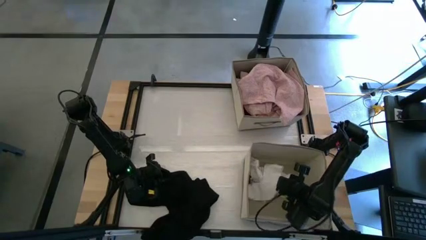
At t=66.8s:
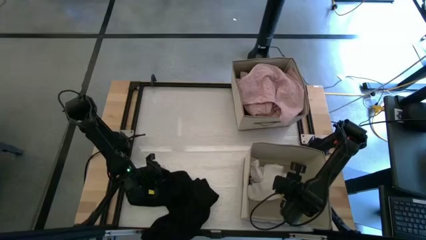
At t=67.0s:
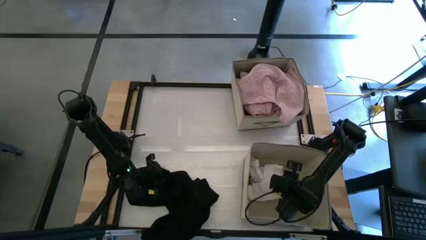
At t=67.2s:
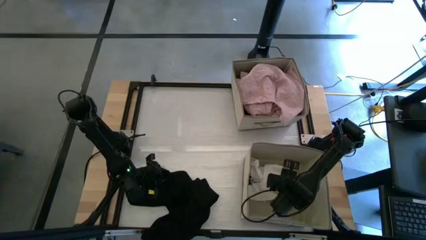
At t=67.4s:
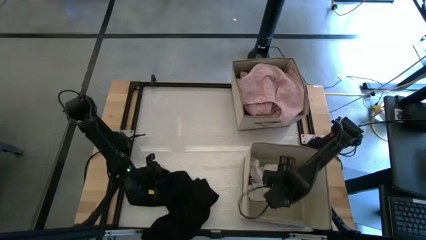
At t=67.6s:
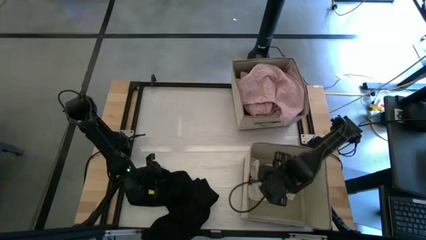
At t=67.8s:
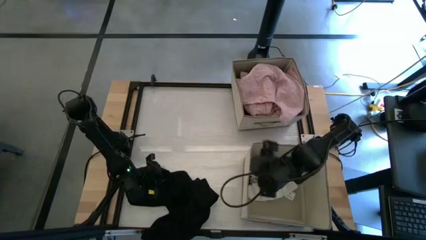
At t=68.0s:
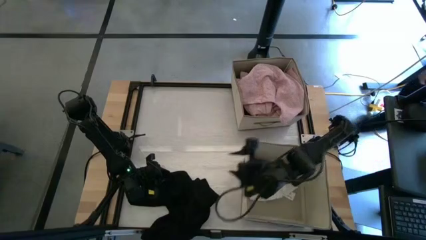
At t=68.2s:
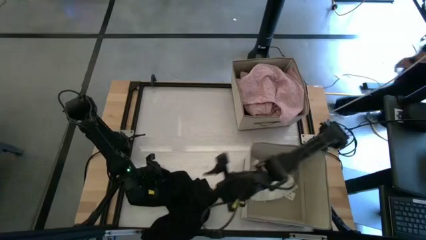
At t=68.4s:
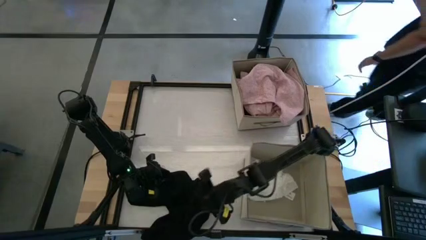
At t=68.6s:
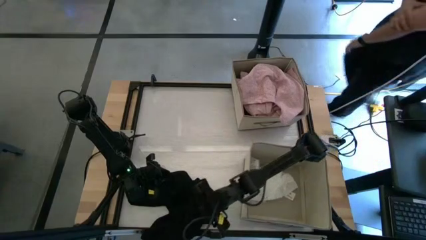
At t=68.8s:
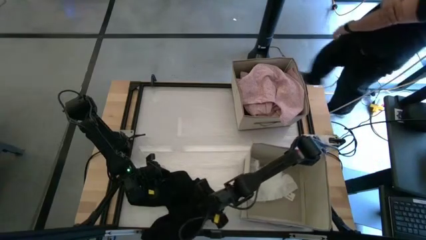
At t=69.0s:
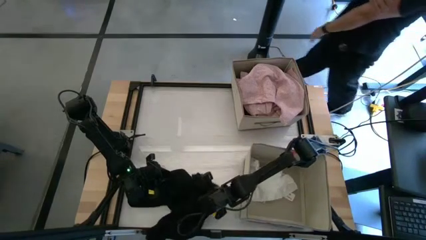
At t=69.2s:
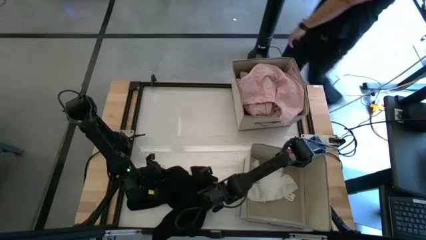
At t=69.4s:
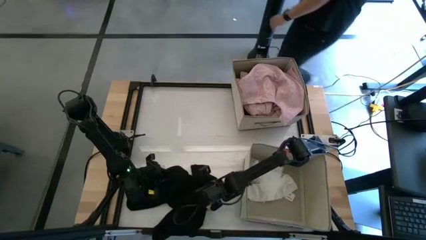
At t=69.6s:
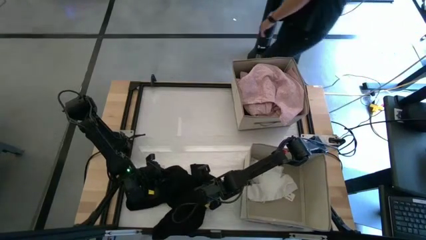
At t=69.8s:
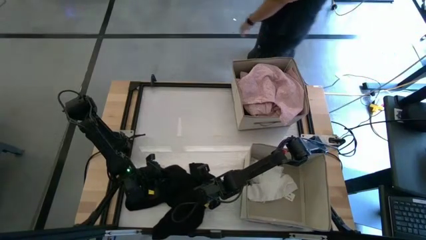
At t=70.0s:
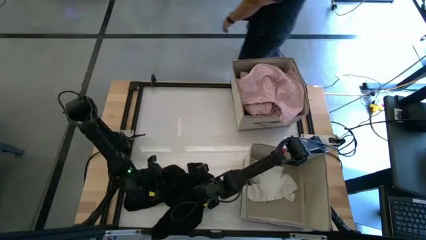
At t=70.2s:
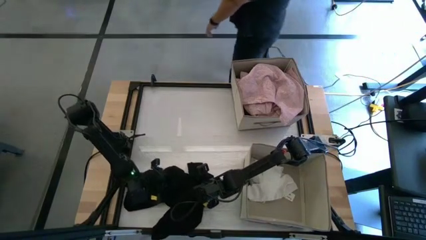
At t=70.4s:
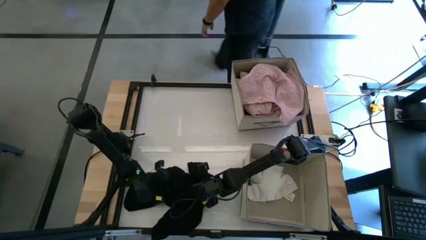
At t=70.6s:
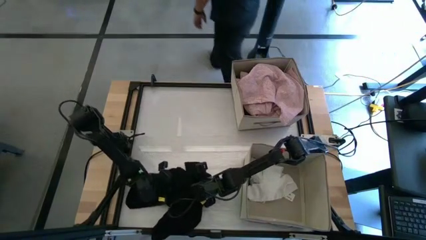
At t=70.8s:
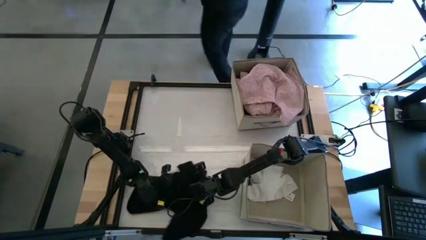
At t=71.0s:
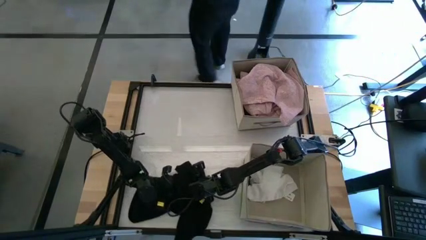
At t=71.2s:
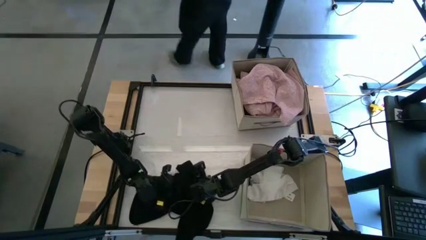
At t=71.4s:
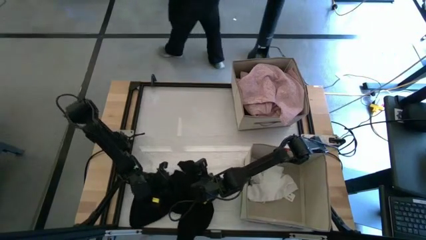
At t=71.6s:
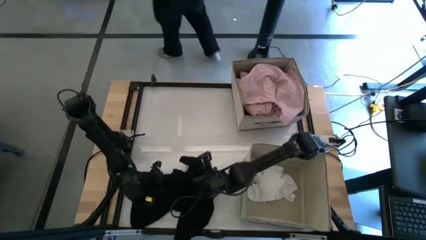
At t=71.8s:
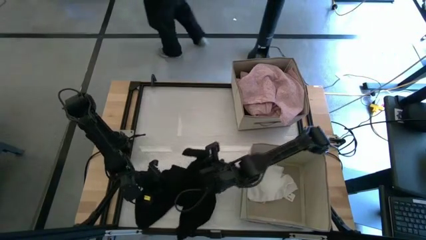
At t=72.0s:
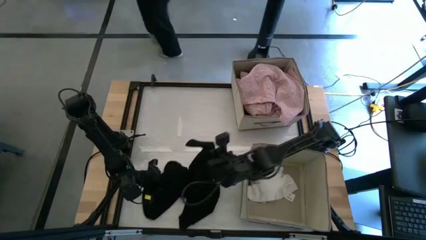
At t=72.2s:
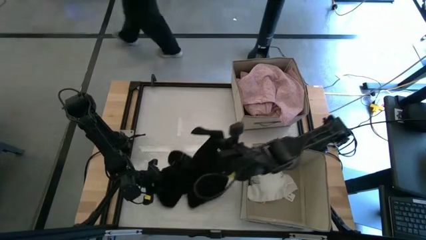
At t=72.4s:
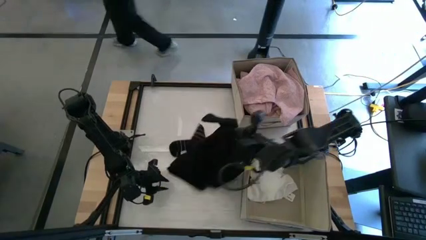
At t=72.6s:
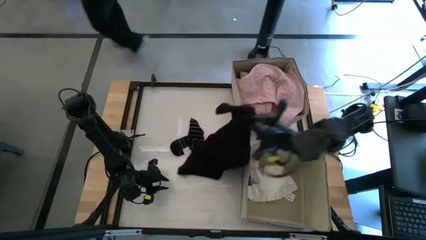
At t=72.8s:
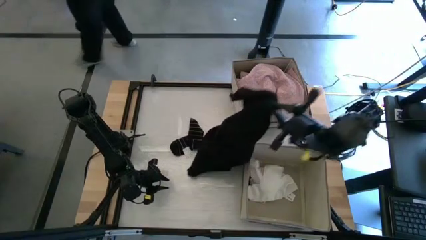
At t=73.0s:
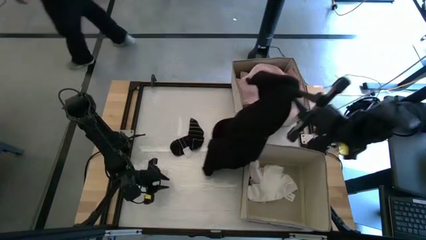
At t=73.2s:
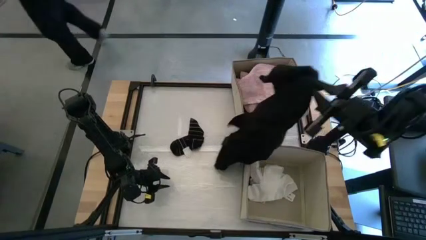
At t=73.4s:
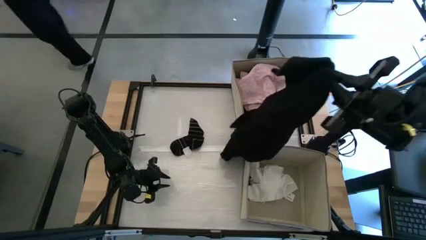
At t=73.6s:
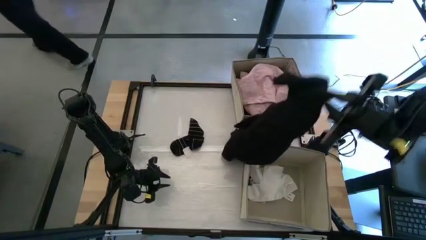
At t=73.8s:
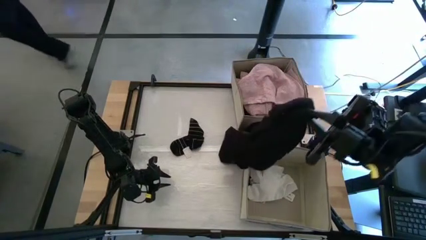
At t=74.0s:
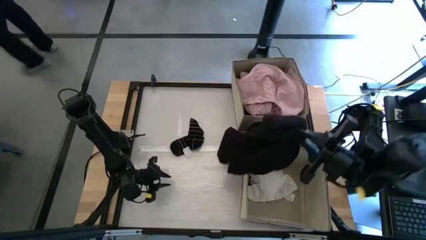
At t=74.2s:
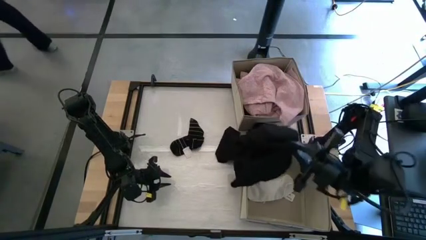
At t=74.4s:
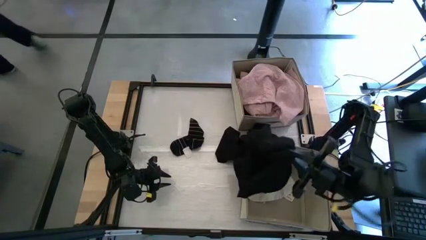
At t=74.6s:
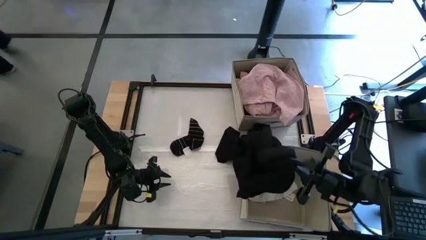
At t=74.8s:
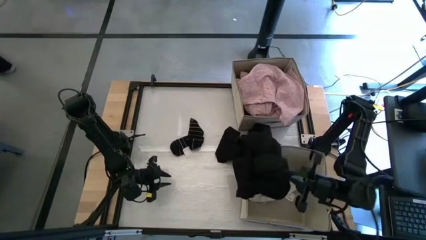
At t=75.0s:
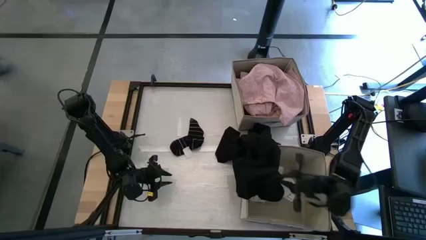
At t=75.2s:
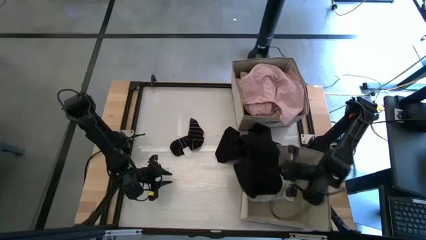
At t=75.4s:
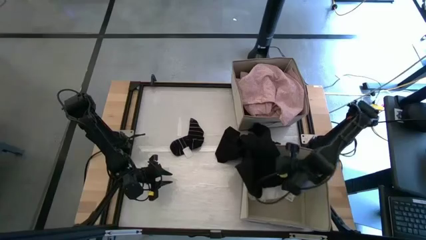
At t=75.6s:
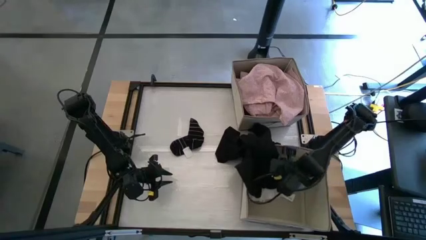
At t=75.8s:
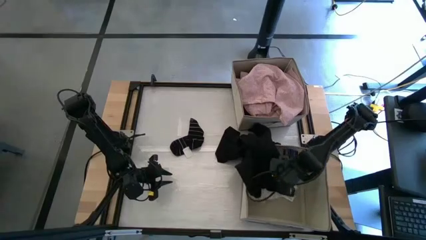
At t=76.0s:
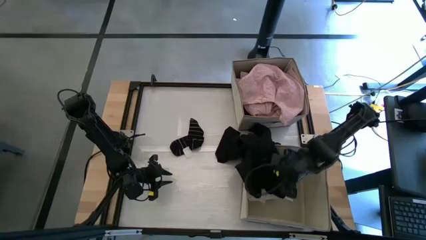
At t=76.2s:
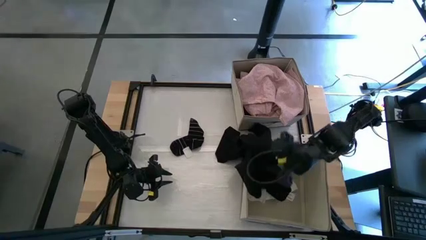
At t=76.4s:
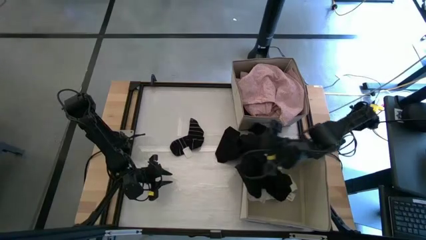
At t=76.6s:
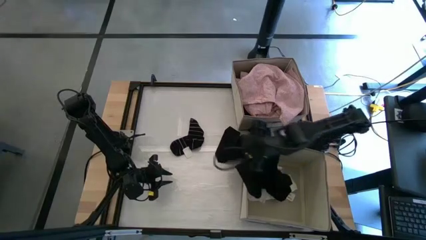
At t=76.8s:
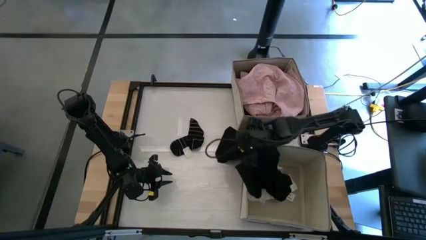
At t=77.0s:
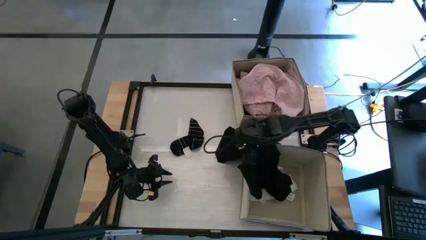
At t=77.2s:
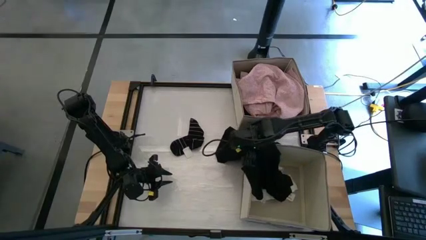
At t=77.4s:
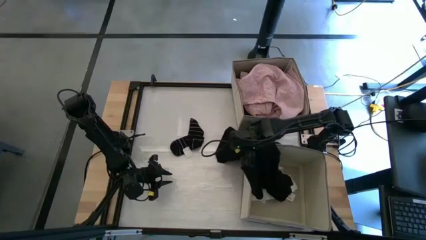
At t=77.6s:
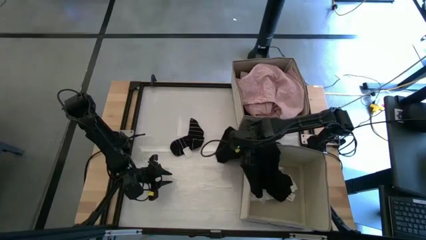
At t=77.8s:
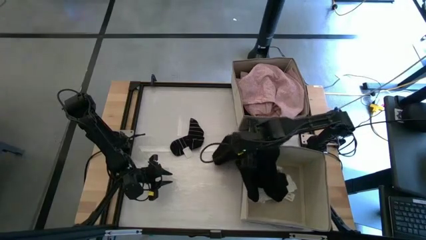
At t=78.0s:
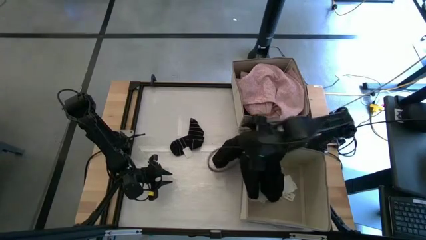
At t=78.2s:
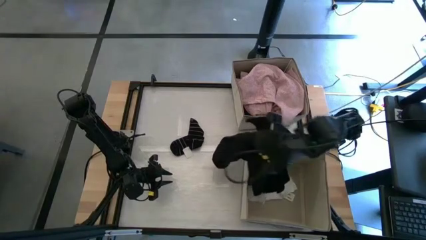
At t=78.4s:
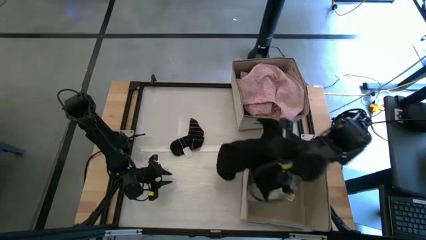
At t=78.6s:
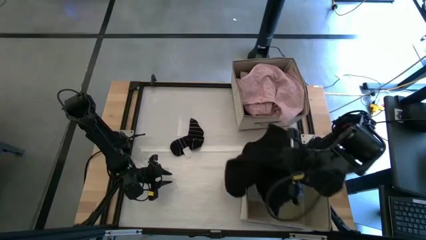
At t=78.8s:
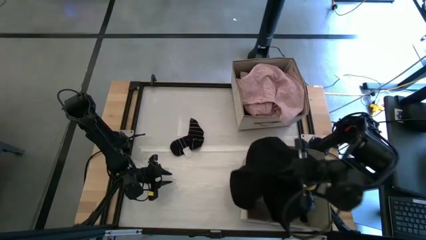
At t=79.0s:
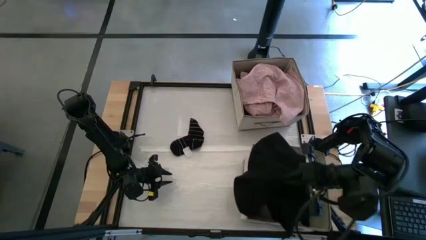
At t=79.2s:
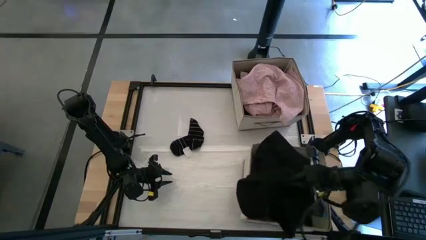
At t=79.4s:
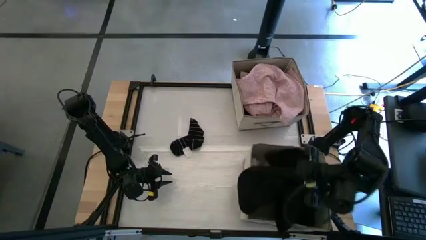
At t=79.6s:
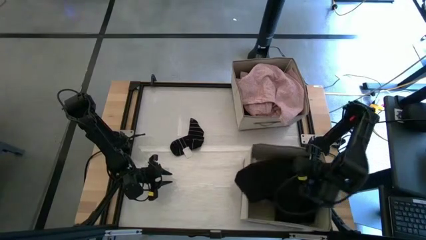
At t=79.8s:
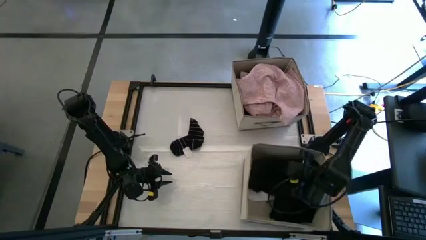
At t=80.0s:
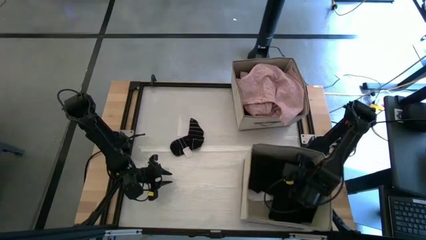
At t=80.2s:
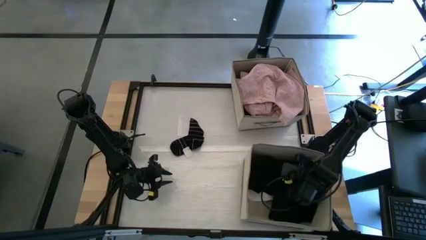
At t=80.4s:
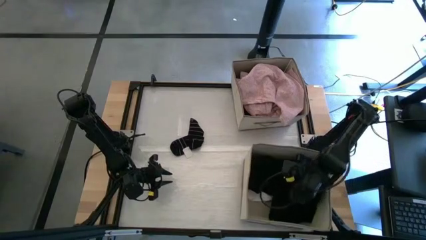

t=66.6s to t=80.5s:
Task: Sort clothes
Put the black polo shirt into the bottom laundry organizer

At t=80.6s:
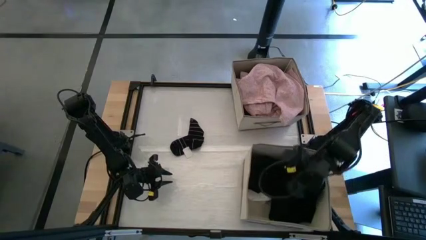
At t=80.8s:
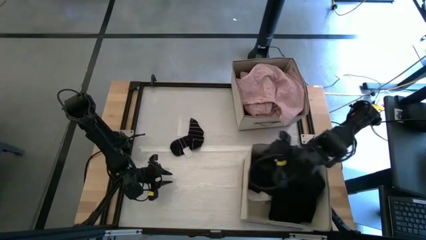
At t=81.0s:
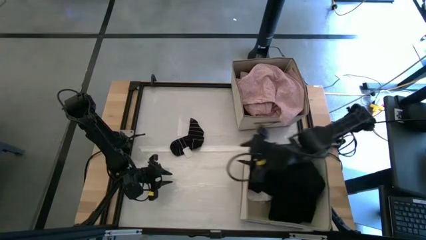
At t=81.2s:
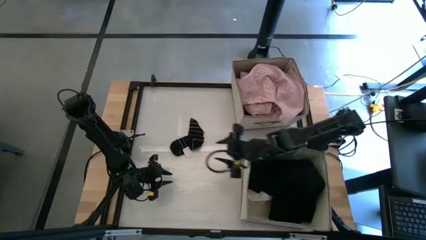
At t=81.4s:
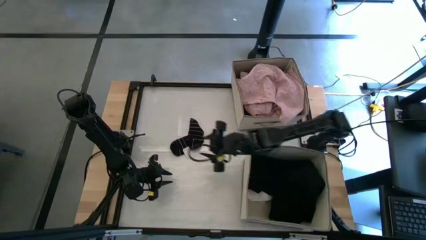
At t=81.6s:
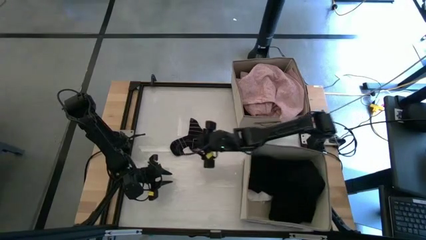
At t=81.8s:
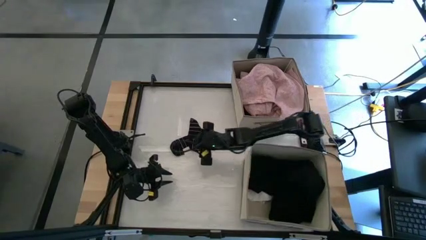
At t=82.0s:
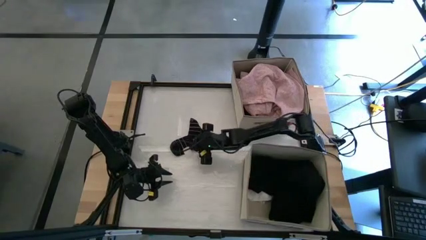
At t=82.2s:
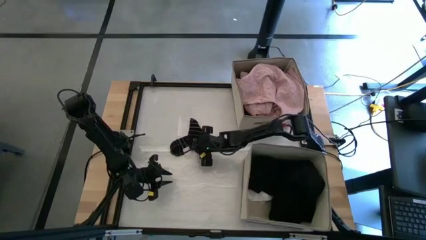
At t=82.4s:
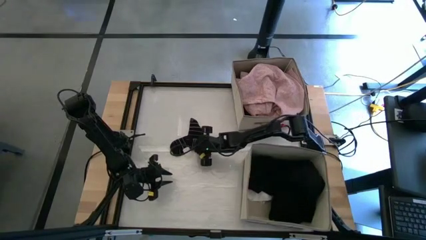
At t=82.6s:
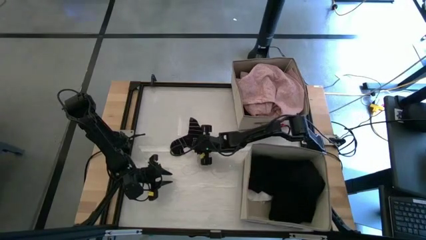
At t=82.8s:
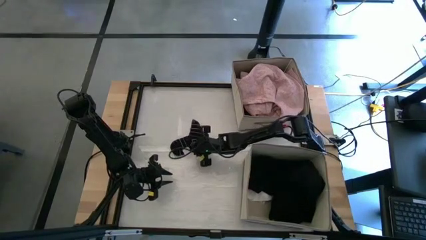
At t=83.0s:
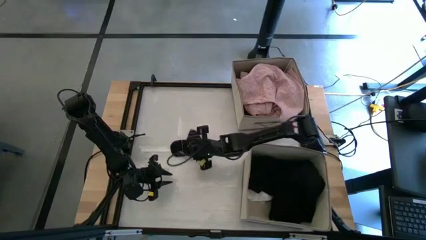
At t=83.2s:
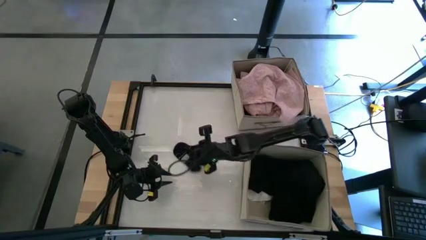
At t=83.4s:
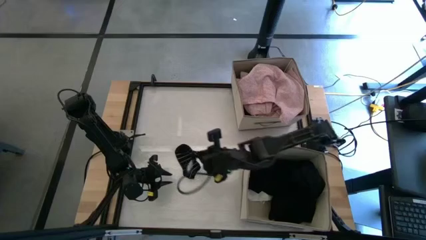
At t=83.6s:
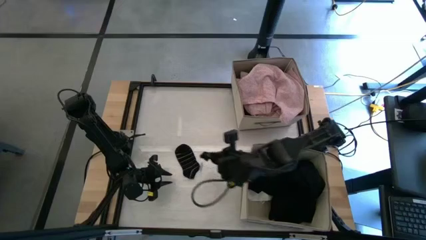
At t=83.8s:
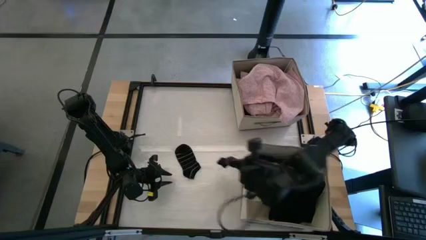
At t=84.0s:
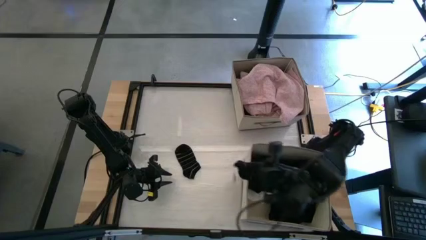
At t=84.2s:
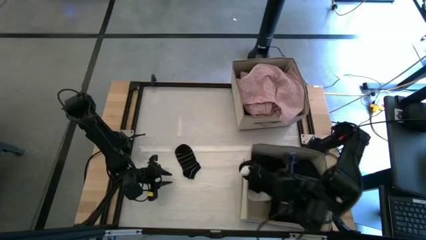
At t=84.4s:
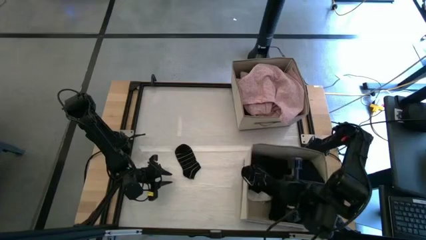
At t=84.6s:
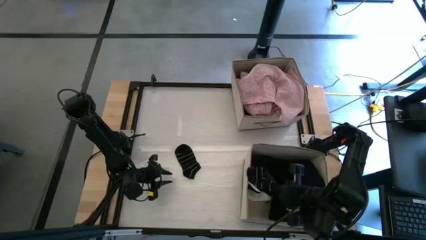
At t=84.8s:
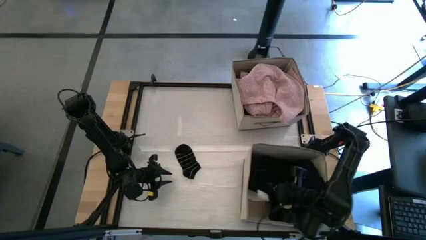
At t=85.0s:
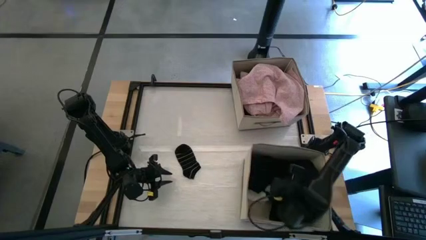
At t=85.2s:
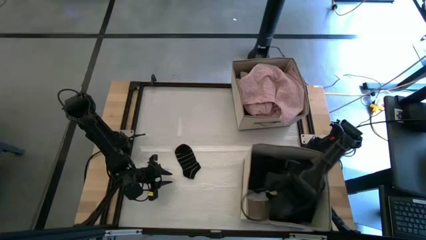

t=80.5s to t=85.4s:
Put the black striped sock into the bottom laundry organizer
